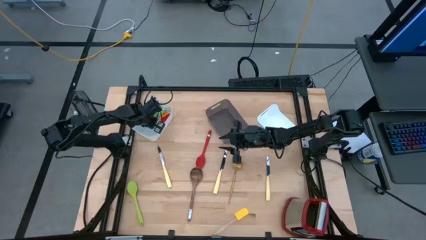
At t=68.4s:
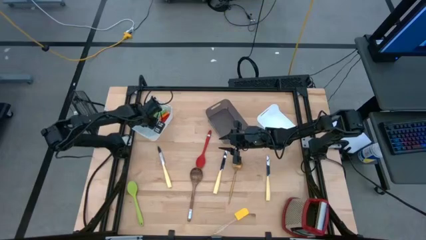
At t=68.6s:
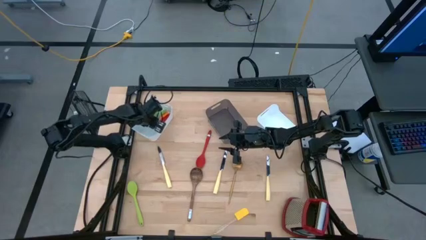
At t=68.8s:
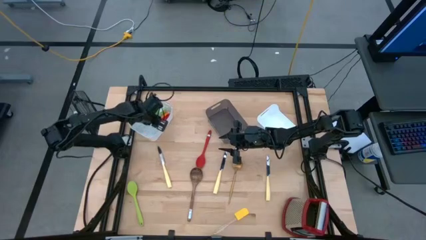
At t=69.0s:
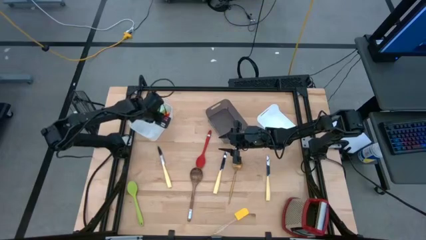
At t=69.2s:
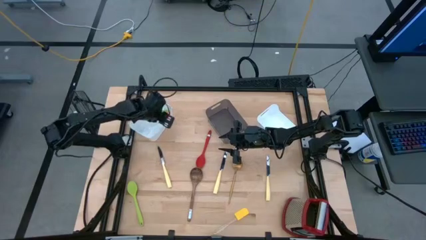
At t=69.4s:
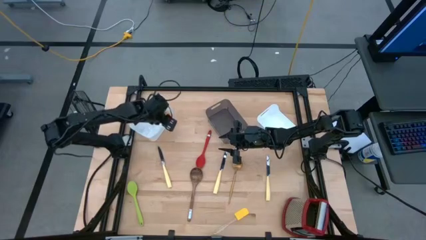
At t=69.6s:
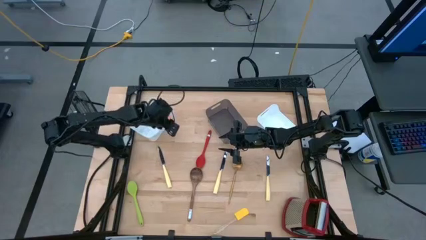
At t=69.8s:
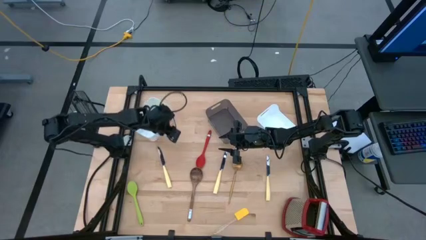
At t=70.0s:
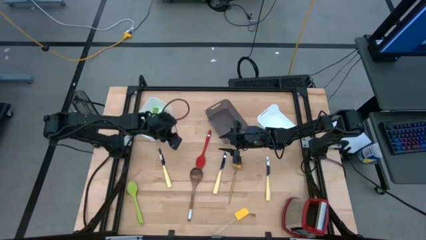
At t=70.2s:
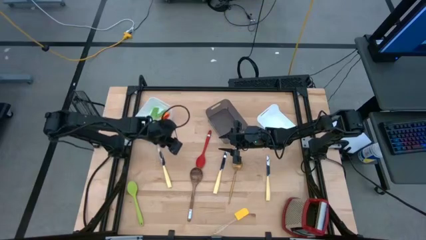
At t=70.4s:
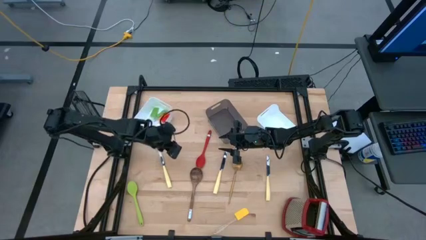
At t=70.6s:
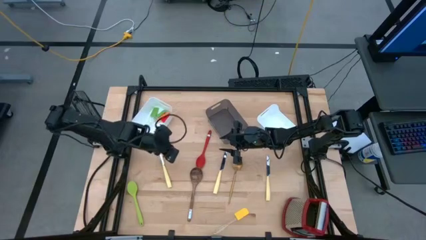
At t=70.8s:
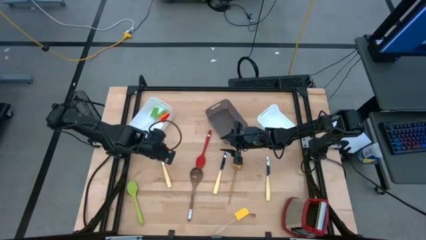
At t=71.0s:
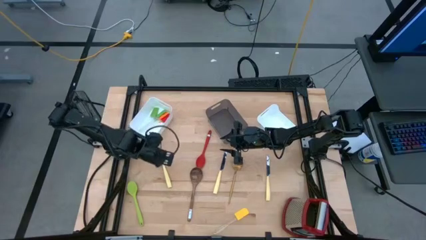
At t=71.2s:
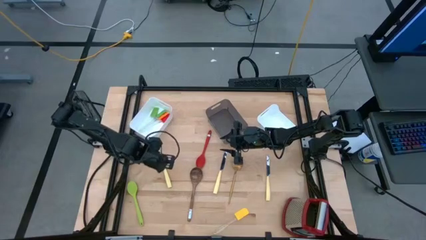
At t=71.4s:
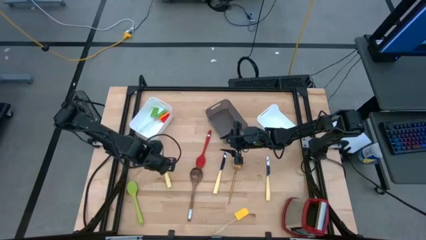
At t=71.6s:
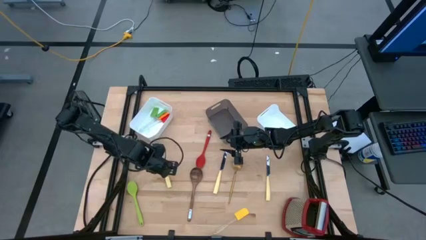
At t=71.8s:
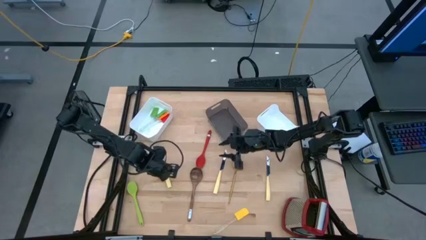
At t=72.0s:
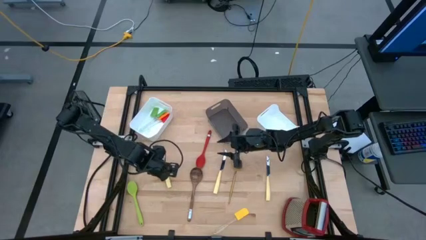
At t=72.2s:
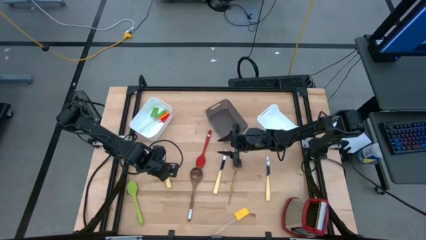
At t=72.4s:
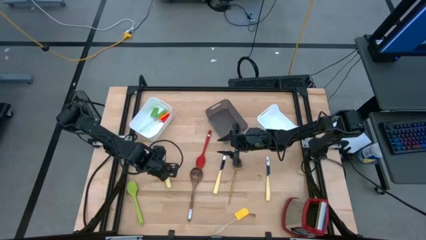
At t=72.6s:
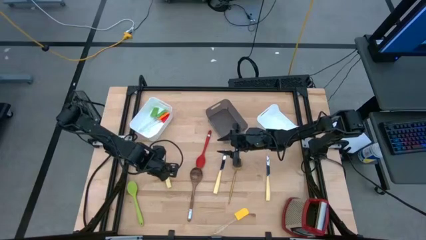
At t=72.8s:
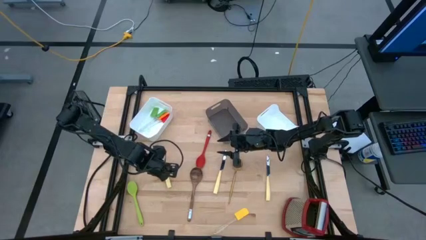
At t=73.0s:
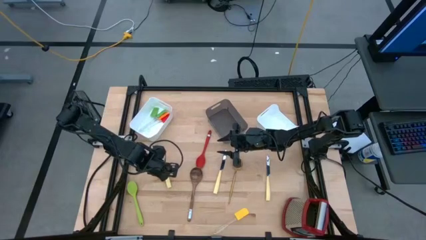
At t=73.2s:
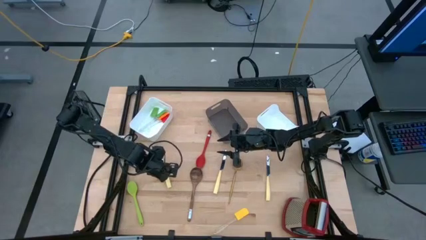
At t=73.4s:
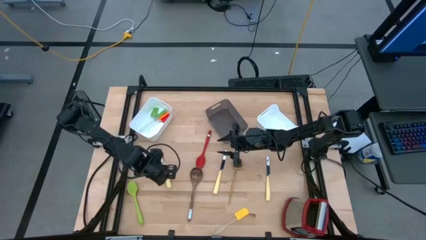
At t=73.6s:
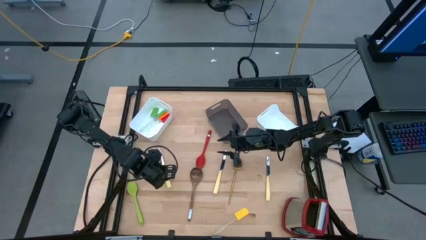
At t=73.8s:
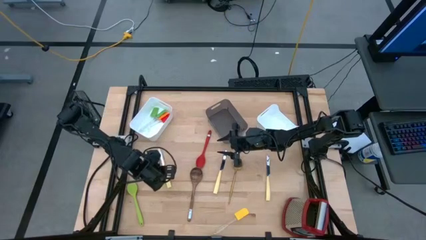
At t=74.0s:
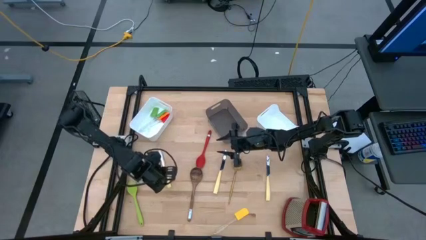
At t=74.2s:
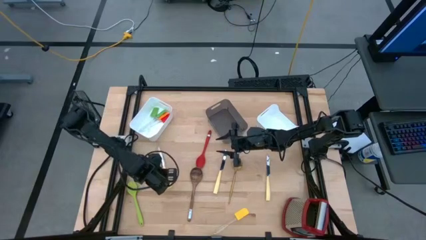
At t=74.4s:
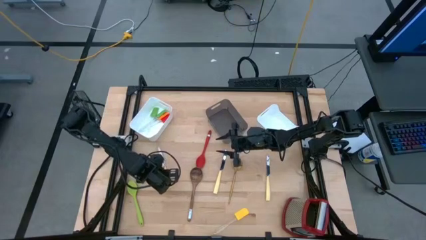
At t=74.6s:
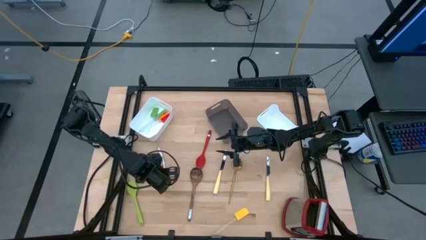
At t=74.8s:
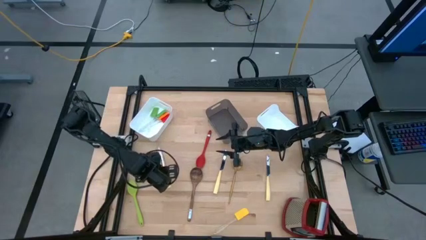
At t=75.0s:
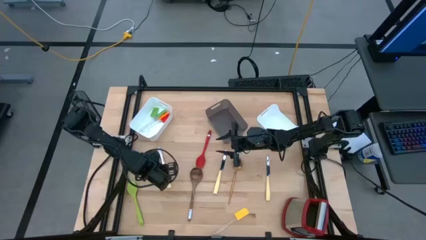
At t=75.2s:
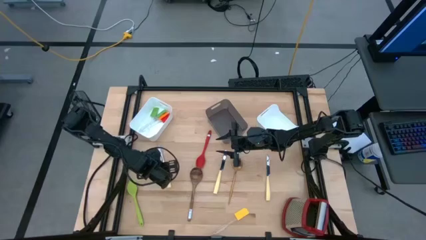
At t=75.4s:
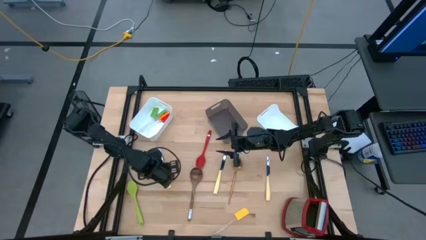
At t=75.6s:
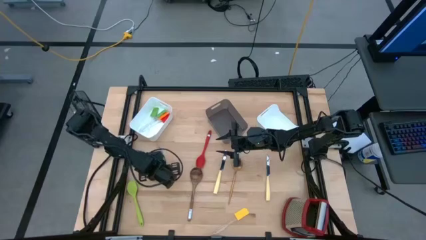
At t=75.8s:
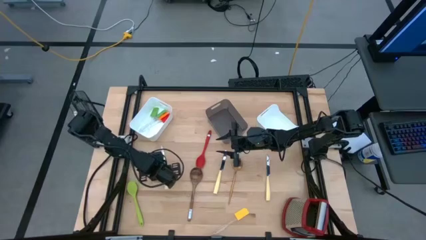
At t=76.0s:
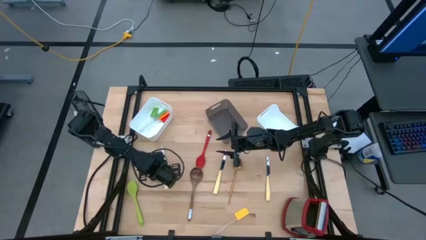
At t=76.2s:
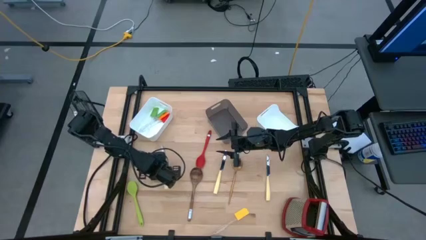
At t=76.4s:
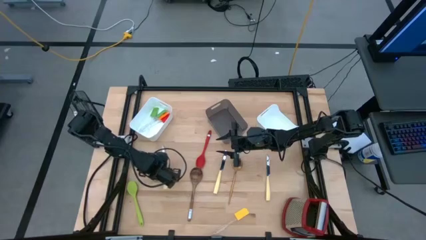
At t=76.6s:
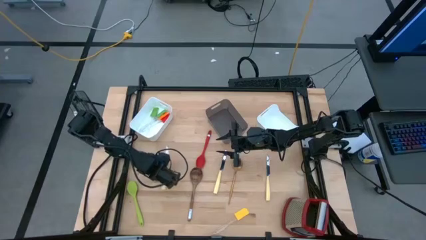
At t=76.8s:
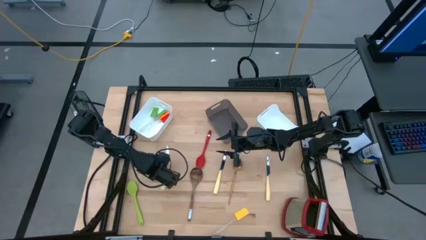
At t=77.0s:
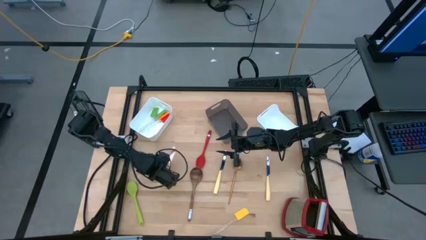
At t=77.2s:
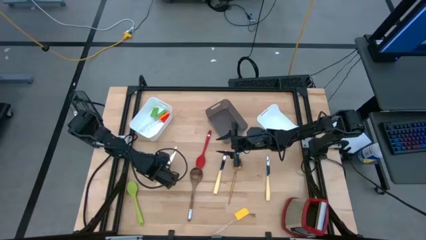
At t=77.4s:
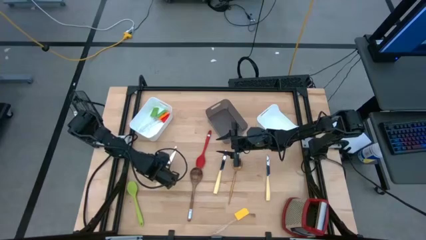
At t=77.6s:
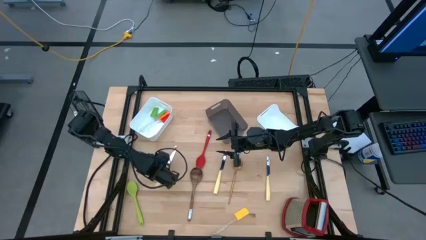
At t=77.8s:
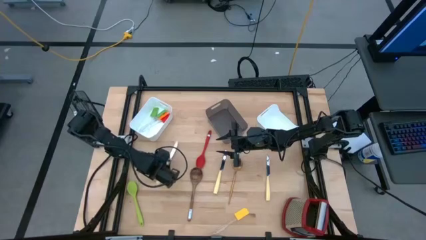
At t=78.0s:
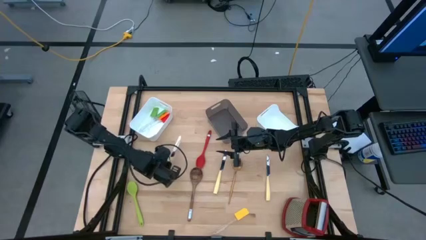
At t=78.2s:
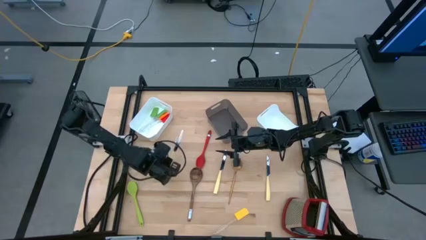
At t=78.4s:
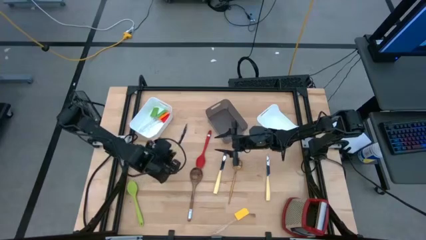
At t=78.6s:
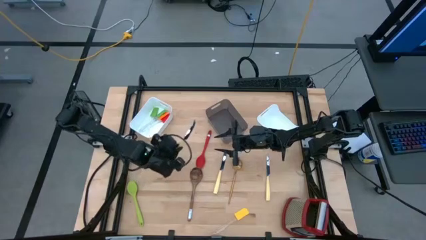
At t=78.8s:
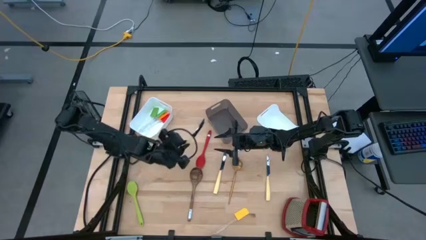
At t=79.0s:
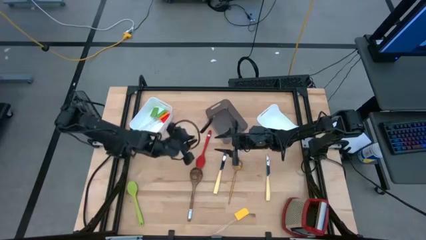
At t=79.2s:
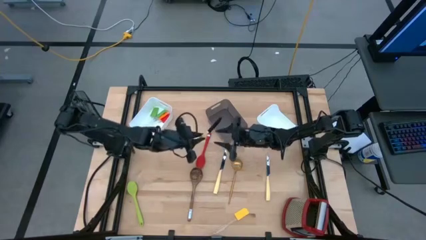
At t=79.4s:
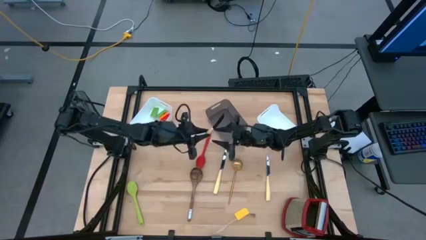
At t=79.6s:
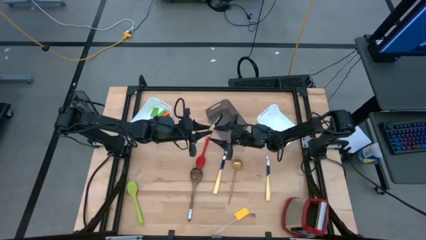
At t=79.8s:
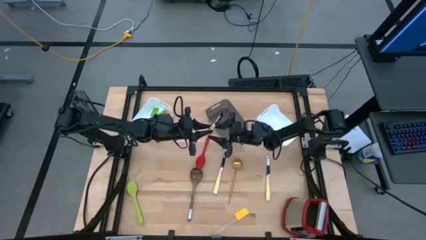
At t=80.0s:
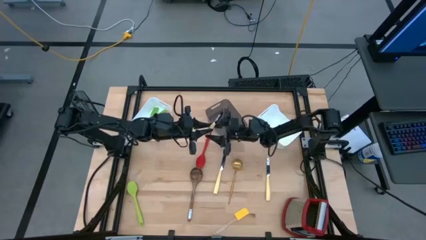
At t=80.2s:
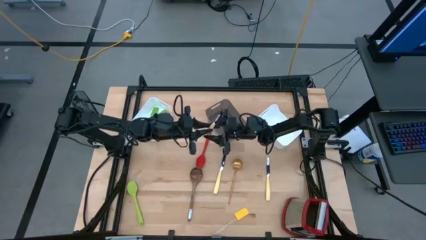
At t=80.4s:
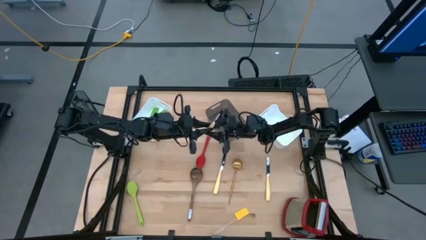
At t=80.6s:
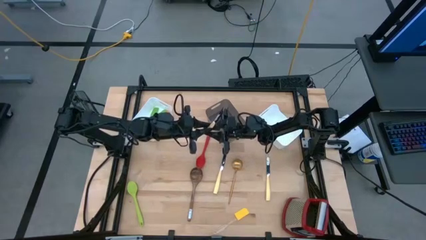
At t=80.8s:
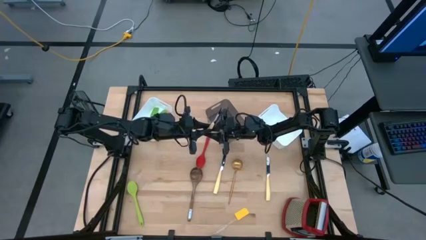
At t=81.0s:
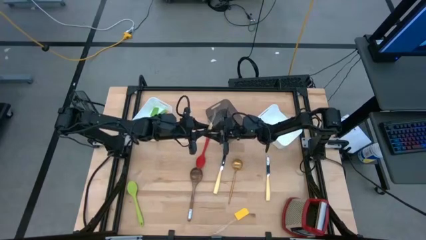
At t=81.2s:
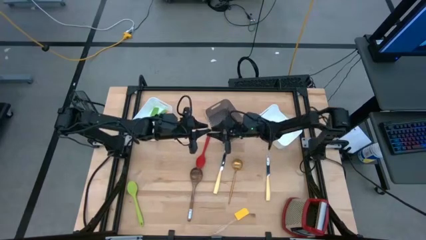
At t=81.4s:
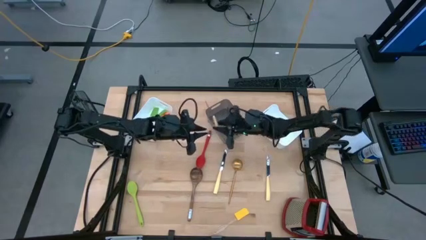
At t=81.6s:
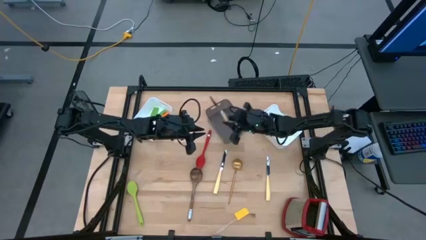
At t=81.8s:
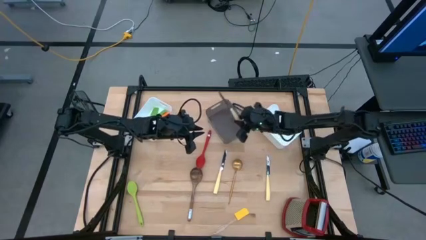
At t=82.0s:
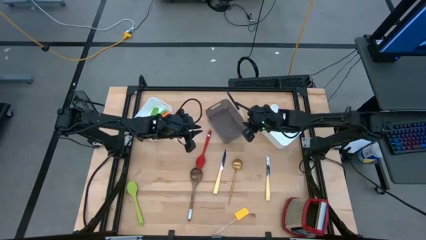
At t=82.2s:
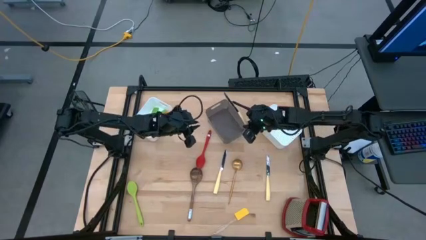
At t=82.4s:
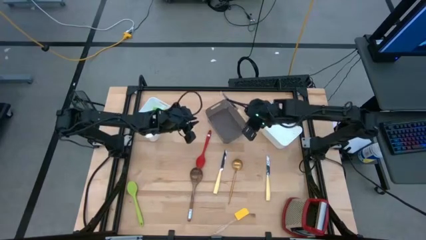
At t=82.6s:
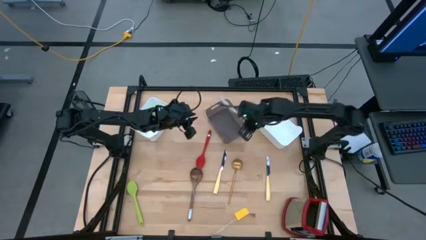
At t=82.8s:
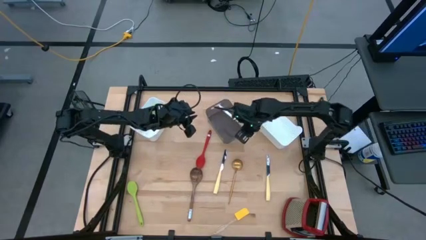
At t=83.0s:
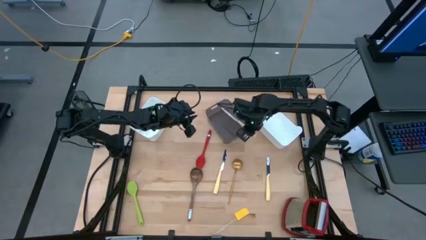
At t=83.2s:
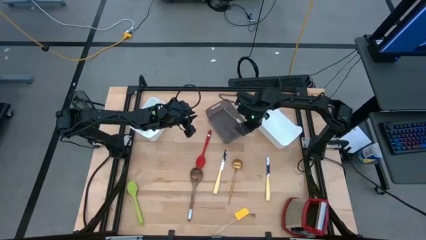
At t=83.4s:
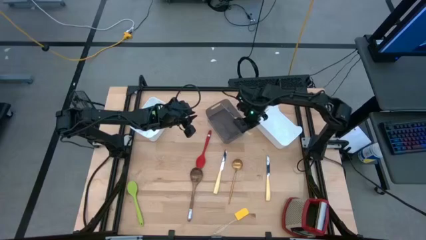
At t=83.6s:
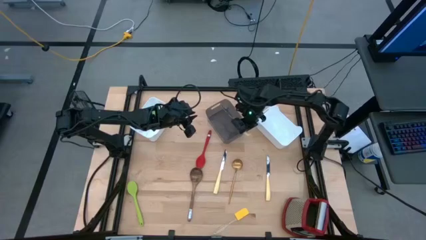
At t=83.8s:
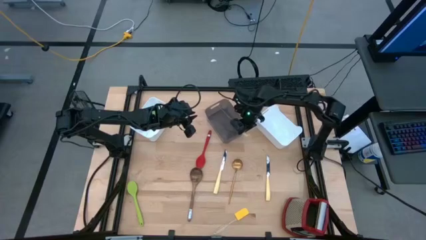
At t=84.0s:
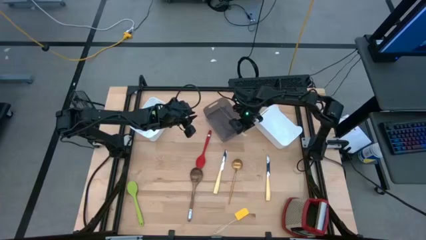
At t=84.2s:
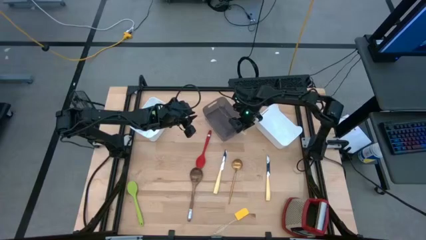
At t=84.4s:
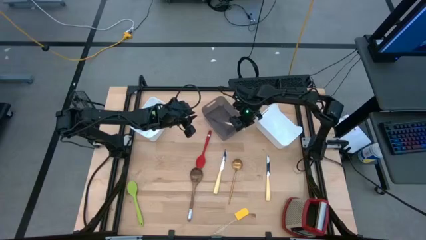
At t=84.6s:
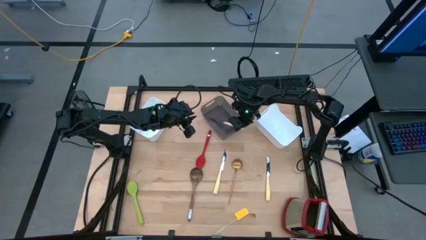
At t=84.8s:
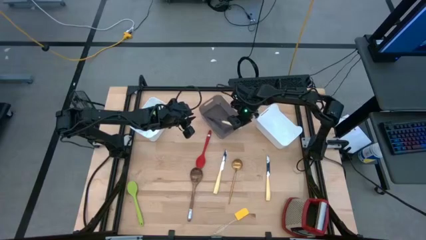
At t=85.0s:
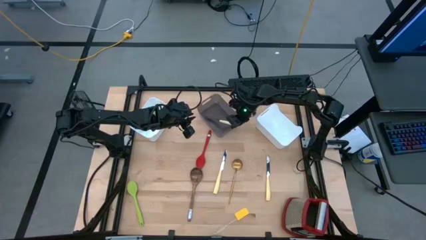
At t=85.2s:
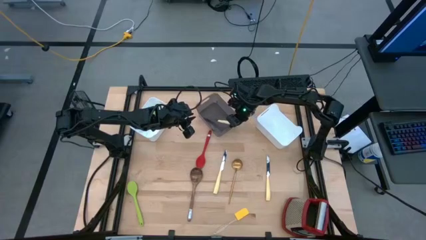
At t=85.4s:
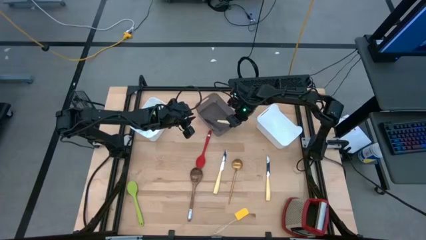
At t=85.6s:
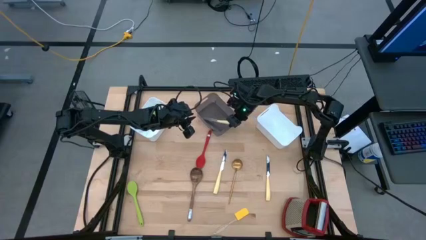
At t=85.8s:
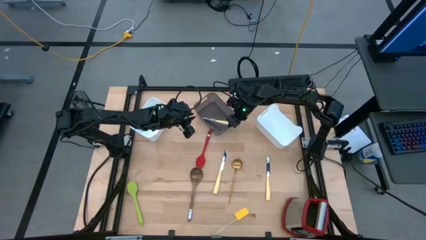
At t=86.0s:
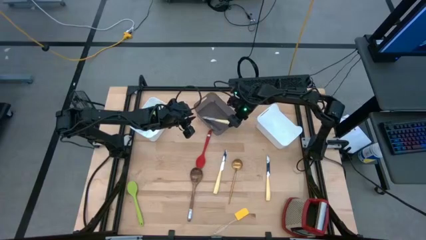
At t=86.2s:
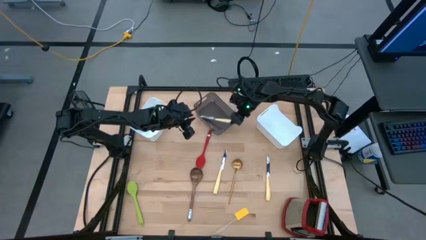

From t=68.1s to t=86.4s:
Task: Pick & Place Kitchen Items
Put the left yellow table knife into black bin
